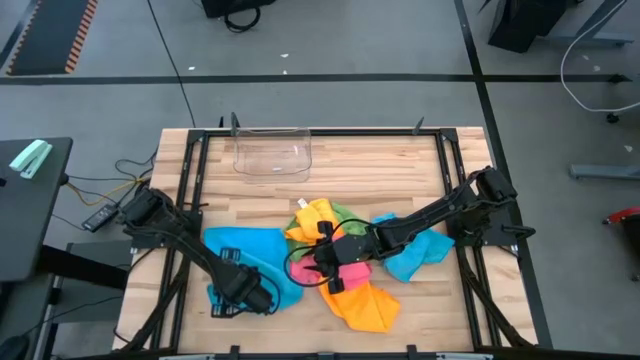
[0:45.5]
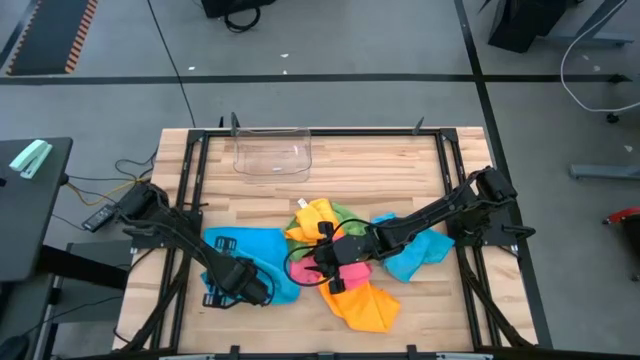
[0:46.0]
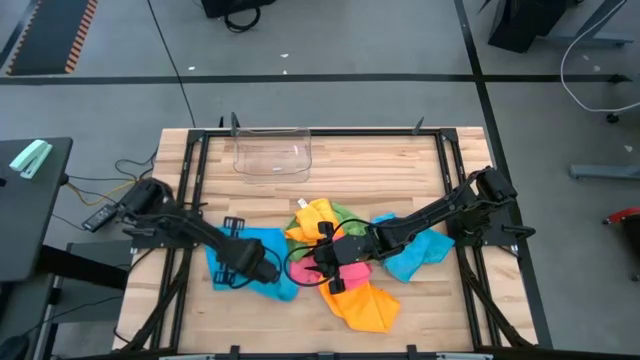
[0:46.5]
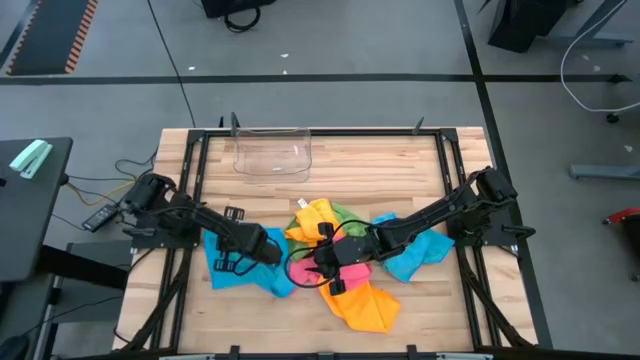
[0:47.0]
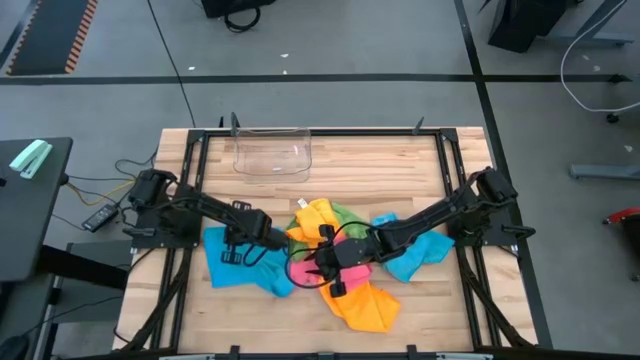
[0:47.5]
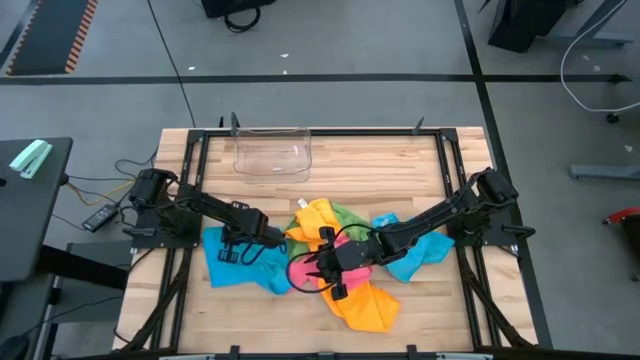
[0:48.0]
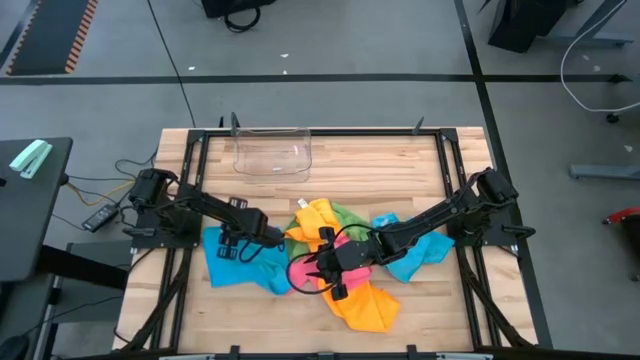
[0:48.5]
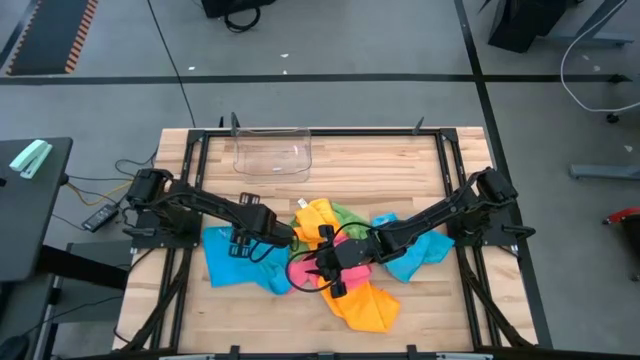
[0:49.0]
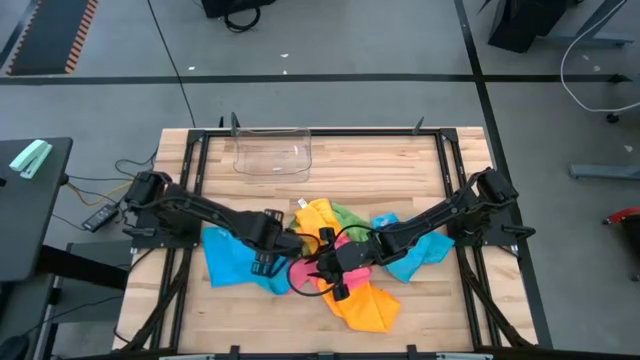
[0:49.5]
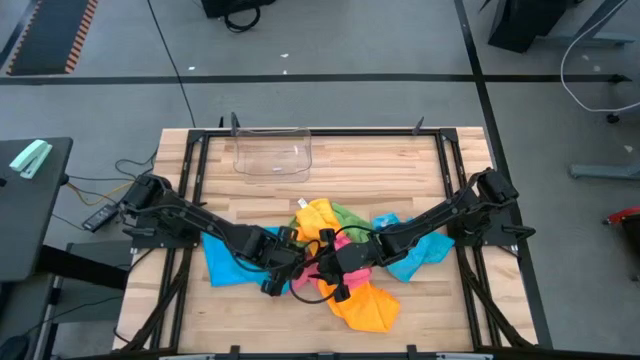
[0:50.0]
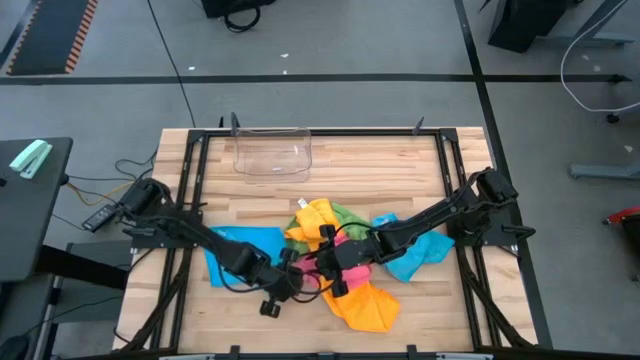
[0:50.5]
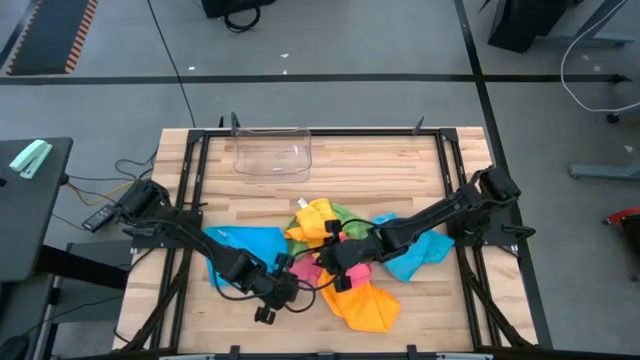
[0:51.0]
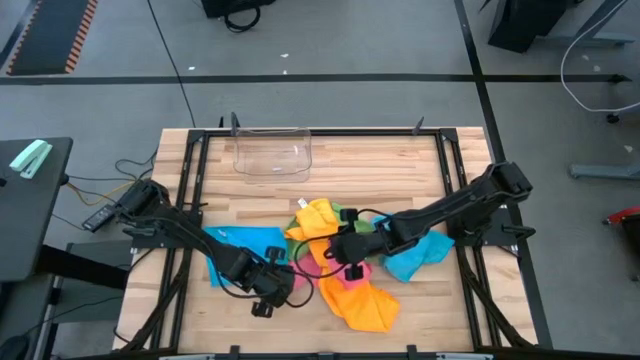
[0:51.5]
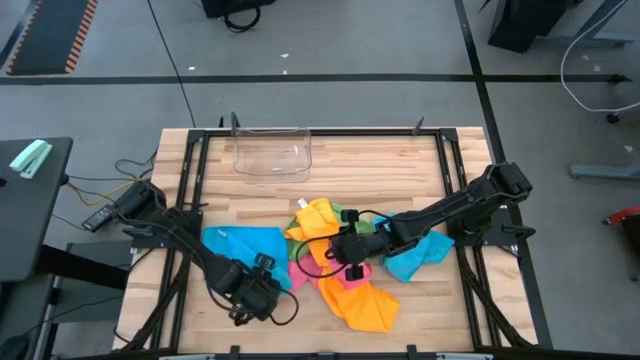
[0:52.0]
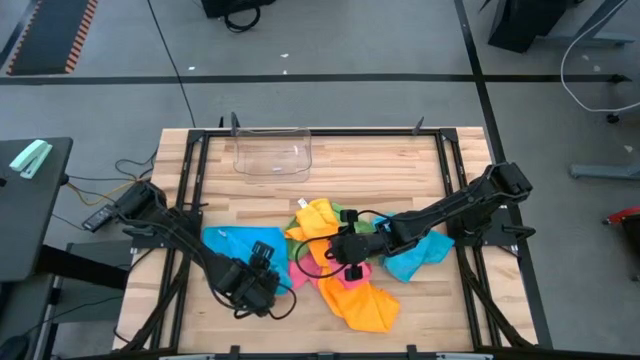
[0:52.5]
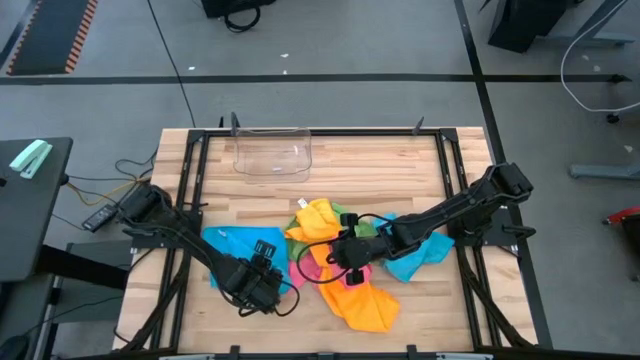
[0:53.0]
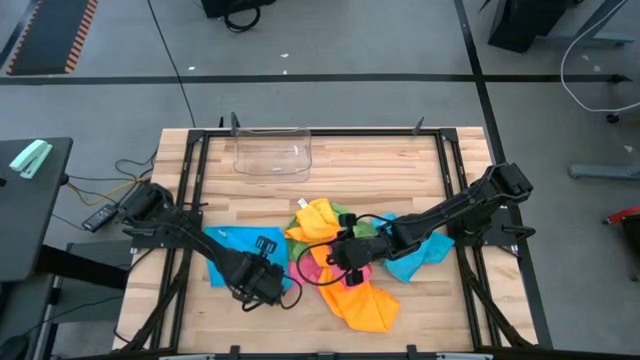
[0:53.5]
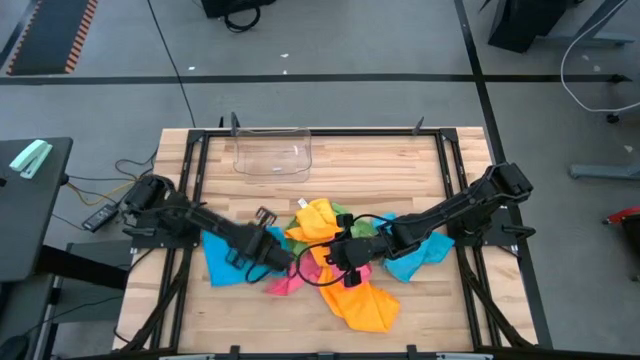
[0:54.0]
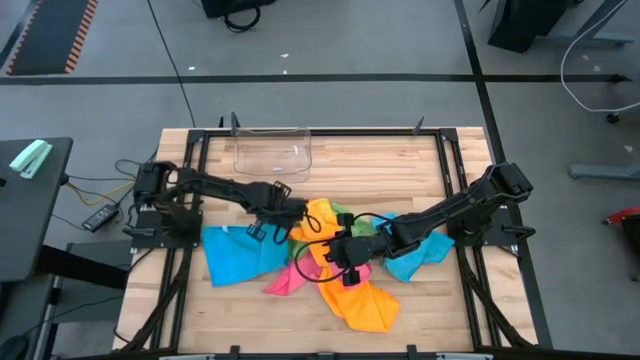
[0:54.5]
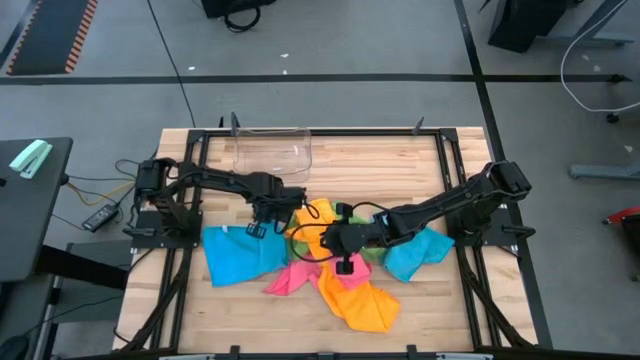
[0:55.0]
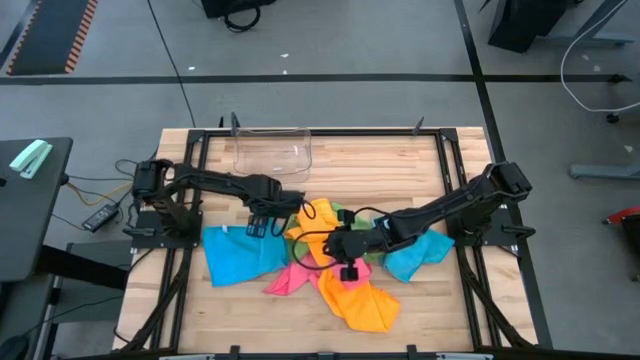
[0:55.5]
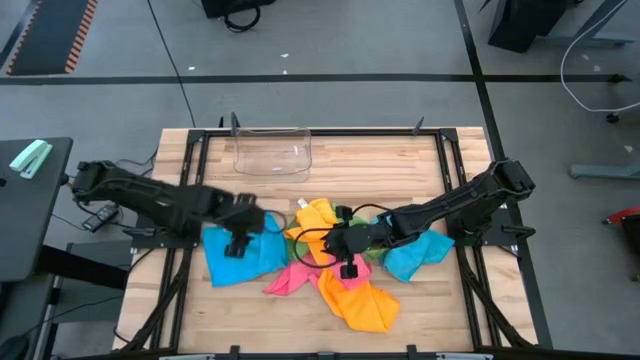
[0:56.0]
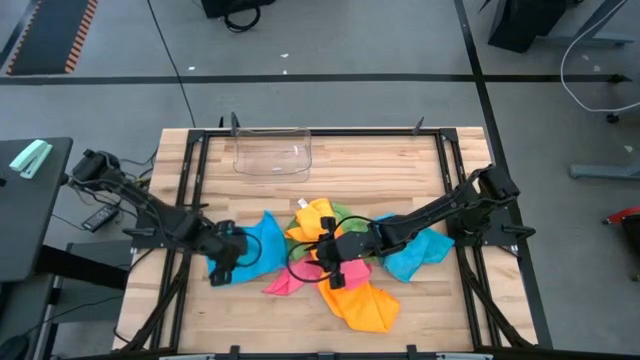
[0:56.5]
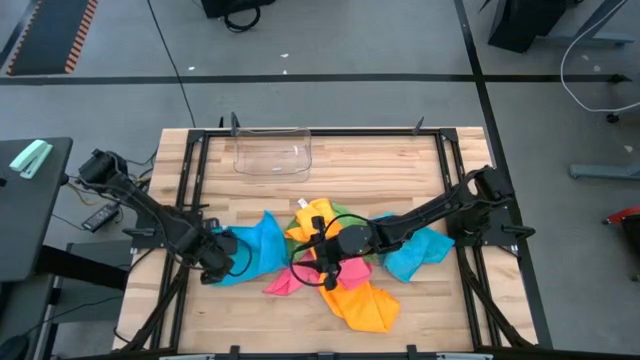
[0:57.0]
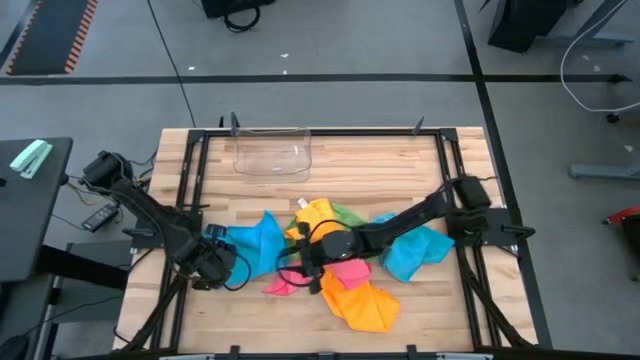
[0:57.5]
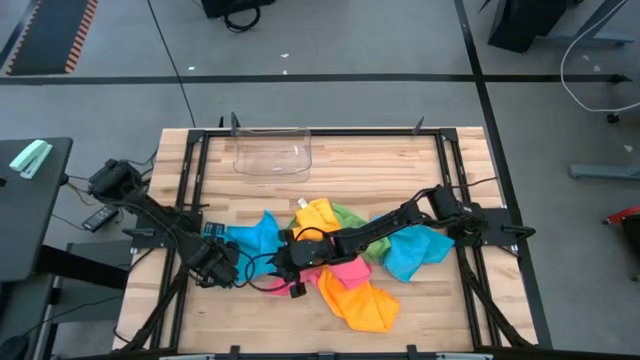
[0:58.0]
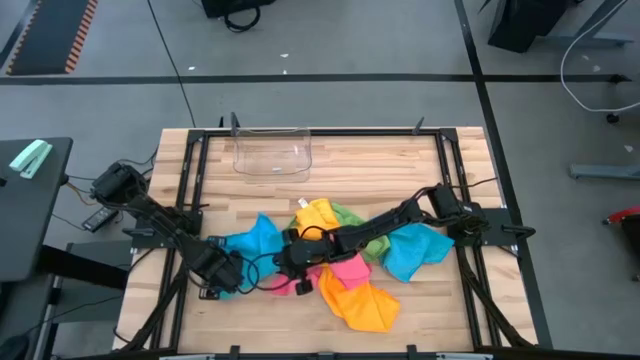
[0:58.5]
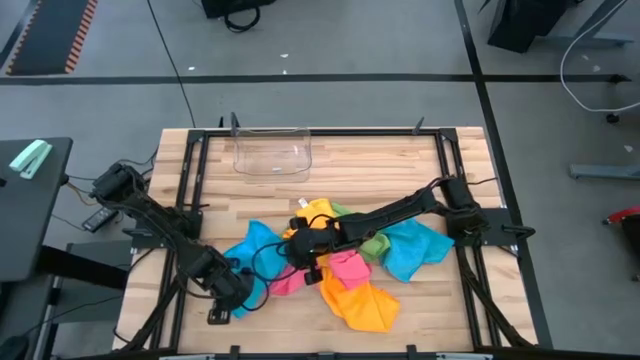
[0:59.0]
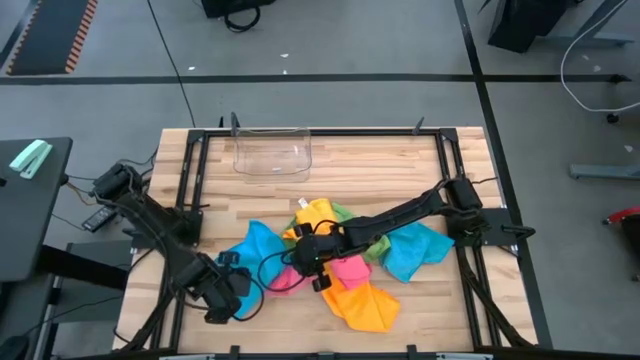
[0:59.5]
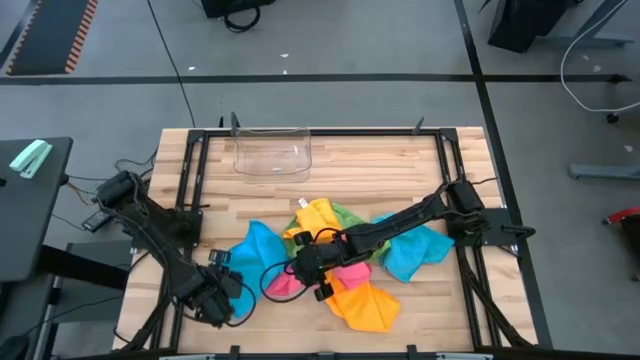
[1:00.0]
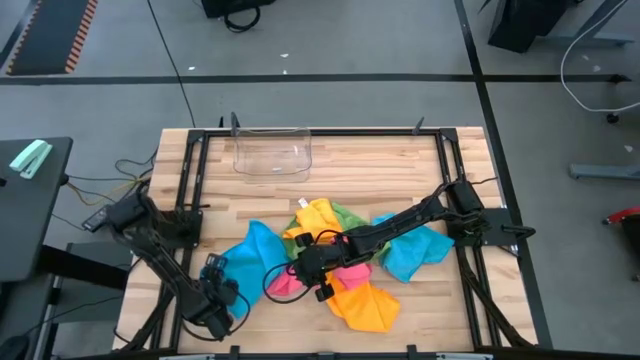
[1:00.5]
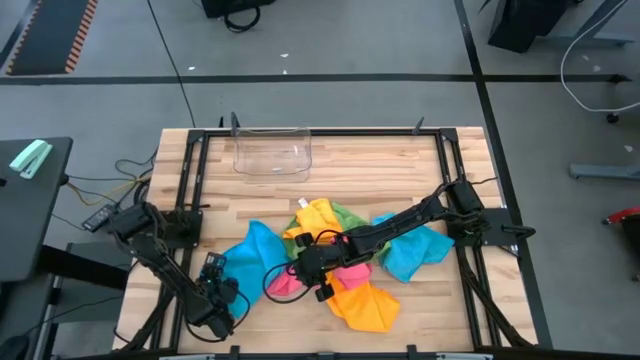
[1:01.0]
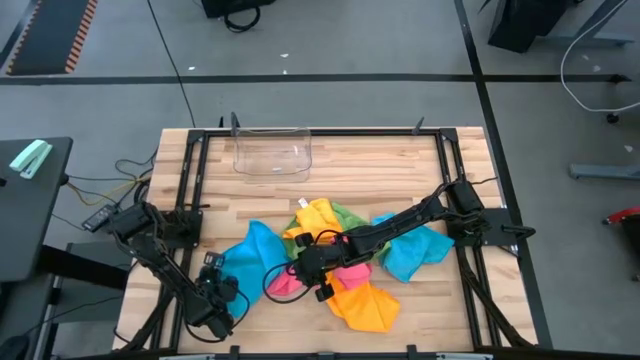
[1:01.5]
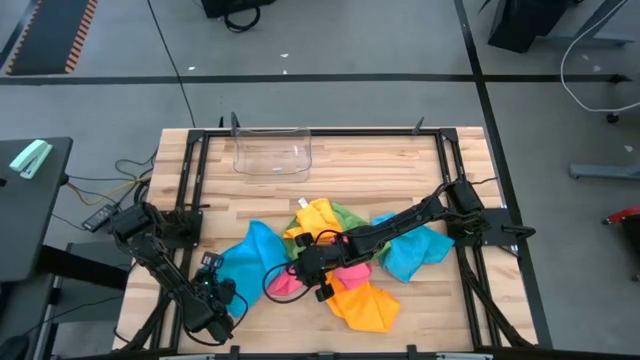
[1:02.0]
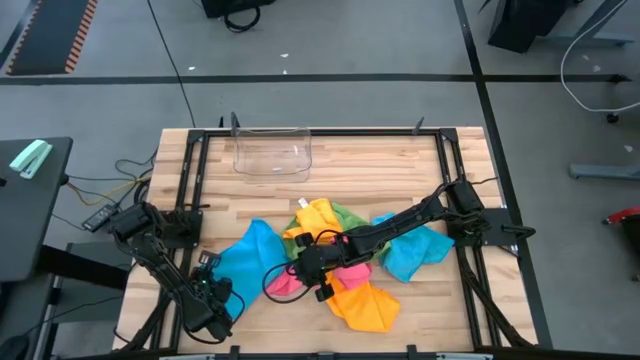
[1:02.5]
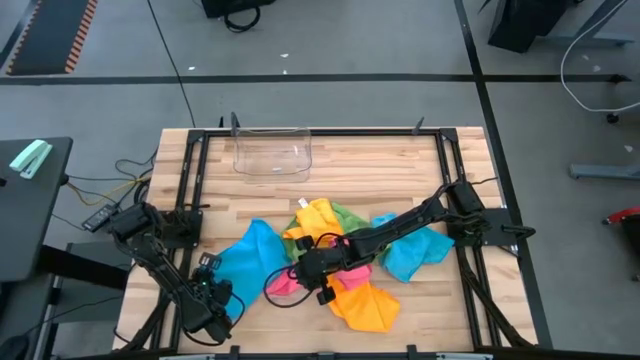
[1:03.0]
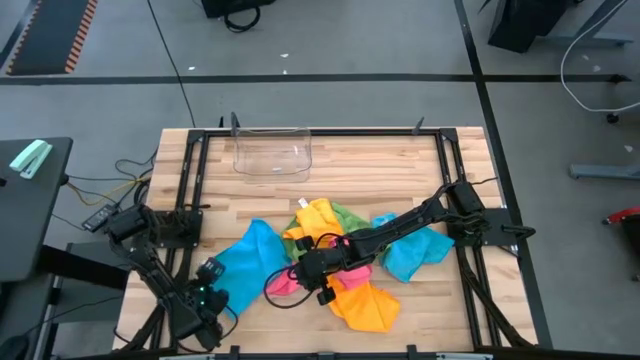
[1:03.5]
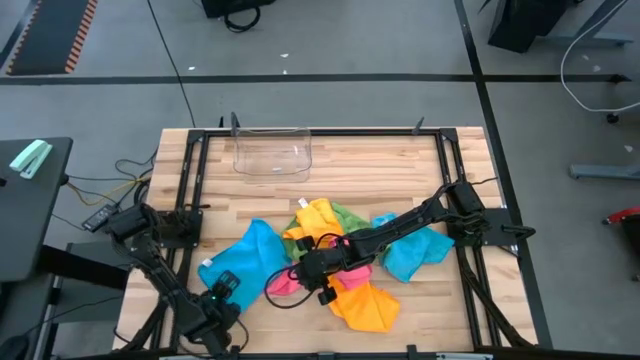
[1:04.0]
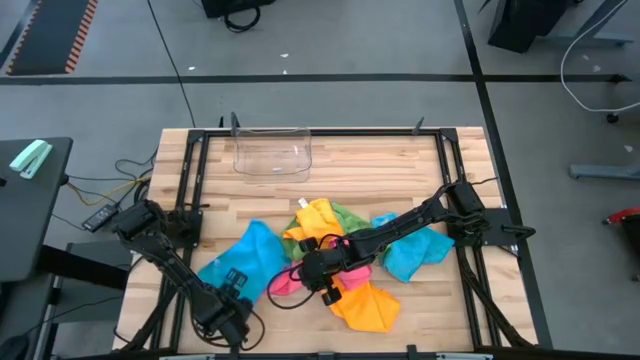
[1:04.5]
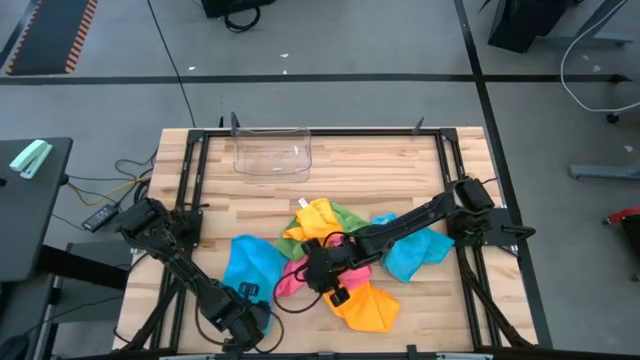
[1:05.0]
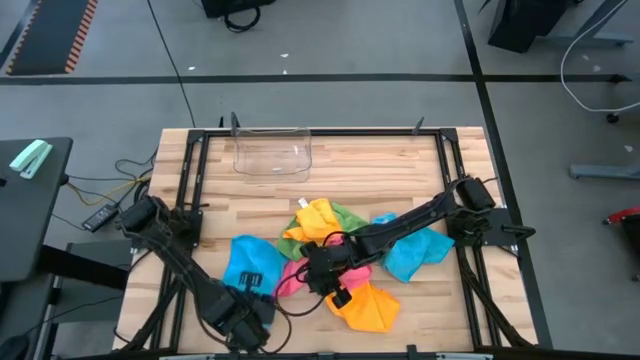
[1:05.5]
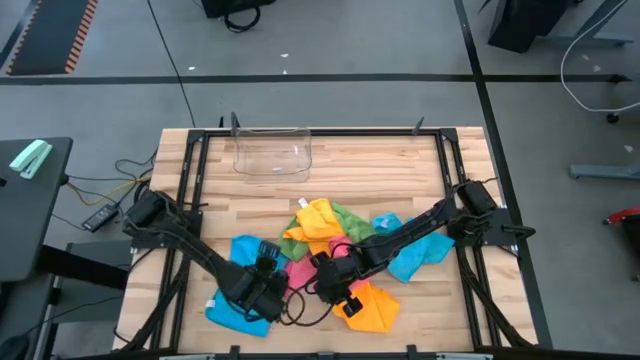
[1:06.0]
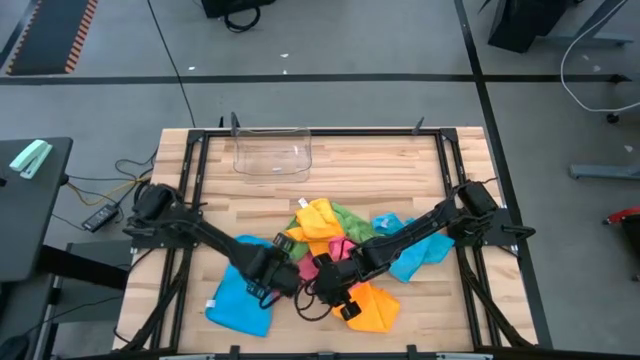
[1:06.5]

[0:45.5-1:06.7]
Task: Fold microfiber towels
Fold the left blue microfiber towel
